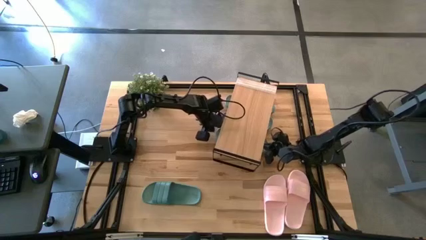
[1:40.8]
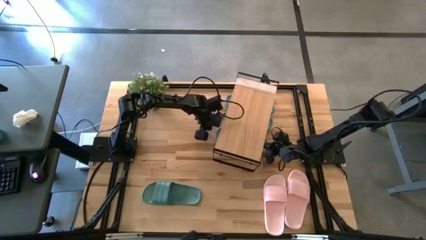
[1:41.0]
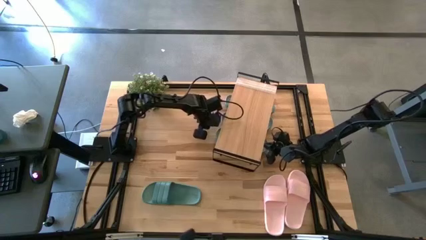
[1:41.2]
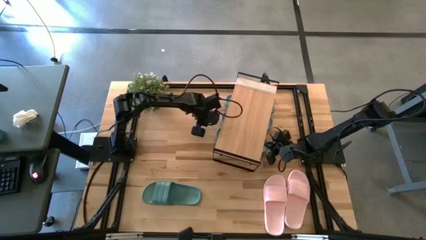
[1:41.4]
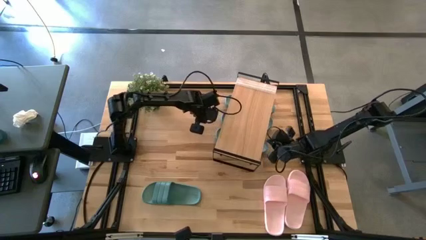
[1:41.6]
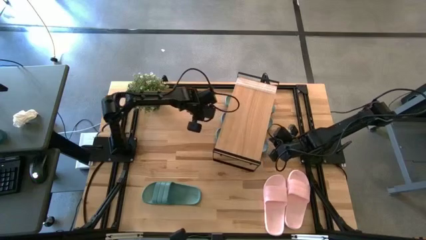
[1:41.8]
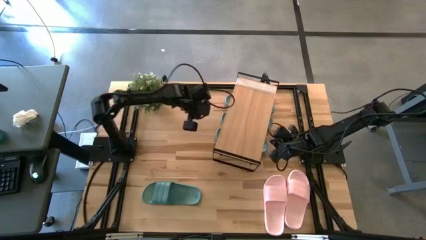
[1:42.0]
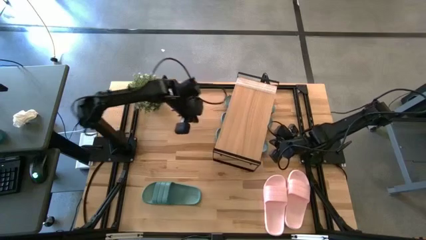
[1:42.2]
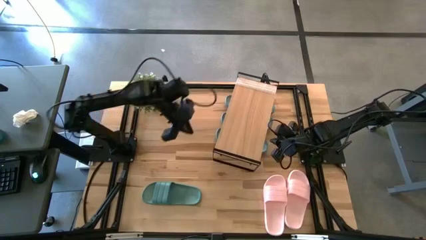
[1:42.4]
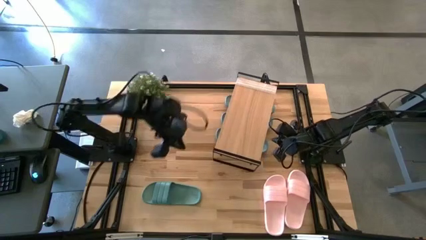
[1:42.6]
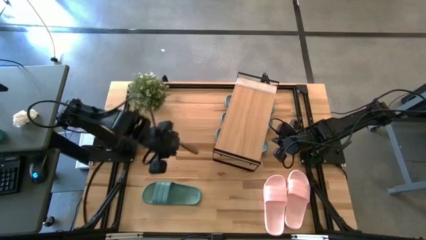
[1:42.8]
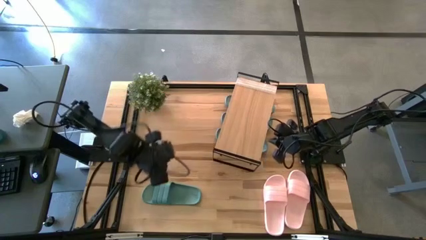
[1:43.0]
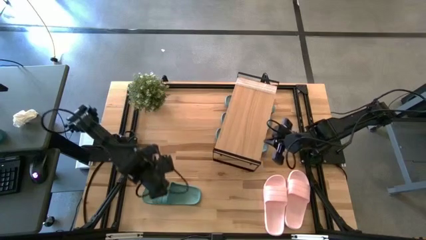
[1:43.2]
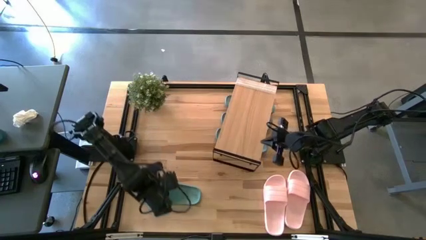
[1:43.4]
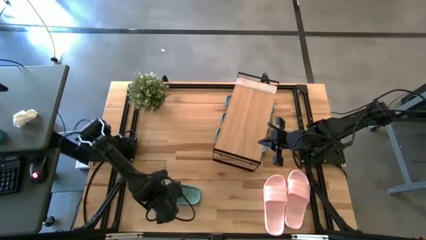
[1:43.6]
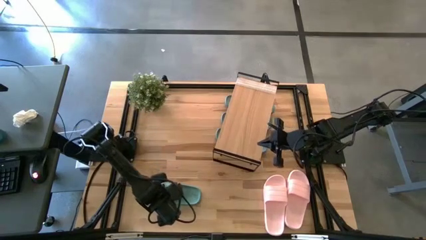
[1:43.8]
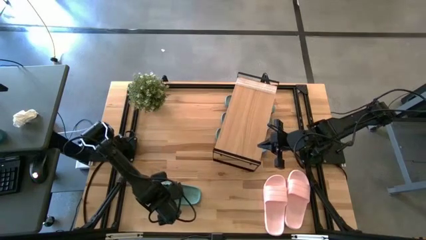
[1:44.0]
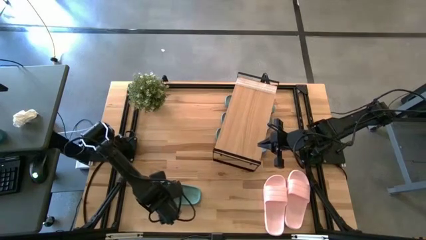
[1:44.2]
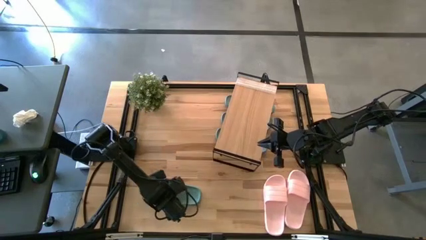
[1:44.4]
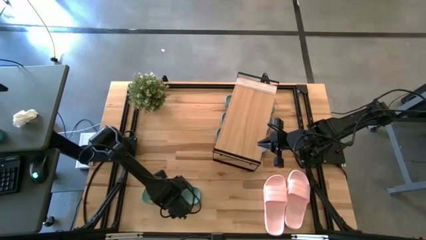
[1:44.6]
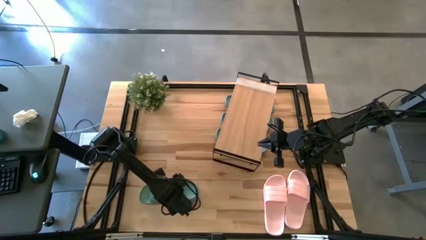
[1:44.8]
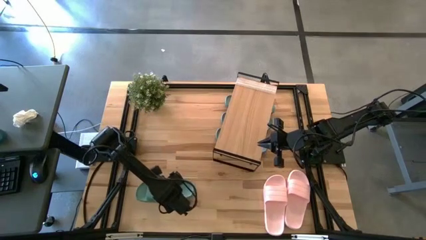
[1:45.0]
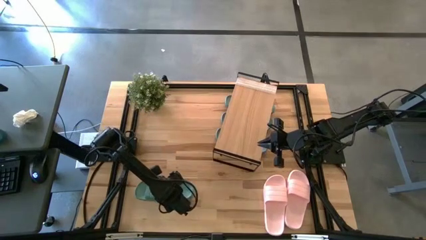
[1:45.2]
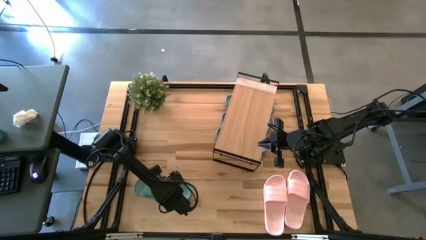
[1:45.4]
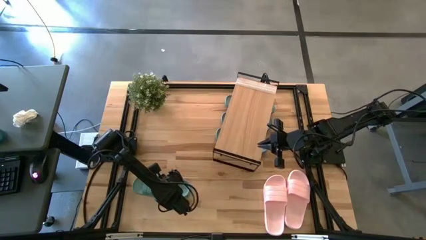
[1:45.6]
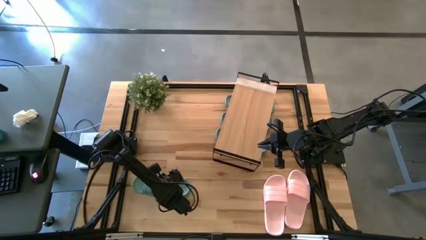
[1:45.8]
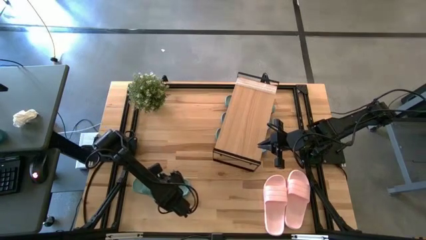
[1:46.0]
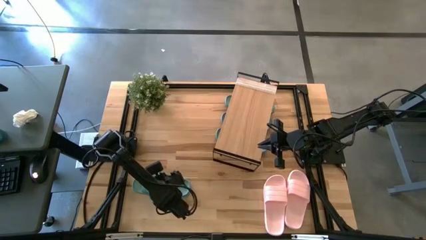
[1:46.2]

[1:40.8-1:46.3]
Task: Pick and place slides into the shelf
Put the green slide under the shelf

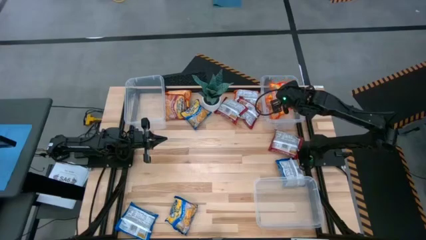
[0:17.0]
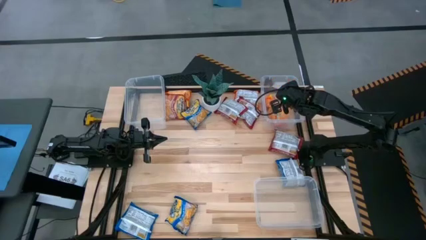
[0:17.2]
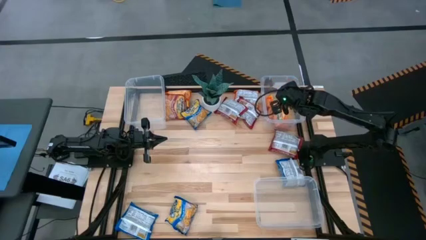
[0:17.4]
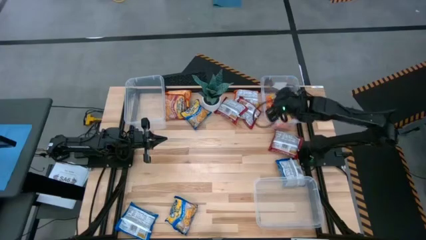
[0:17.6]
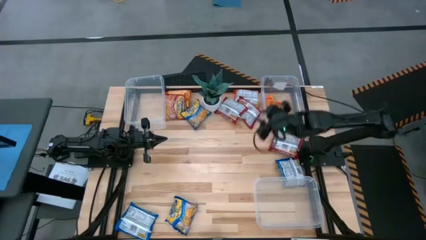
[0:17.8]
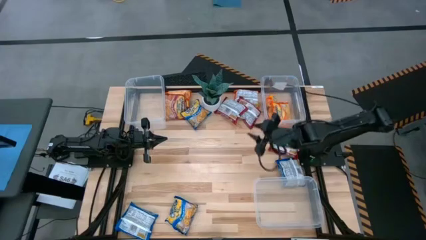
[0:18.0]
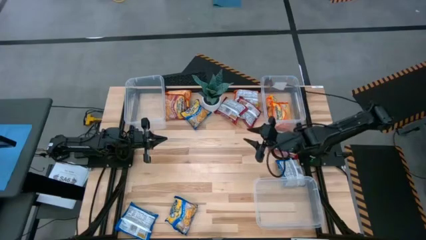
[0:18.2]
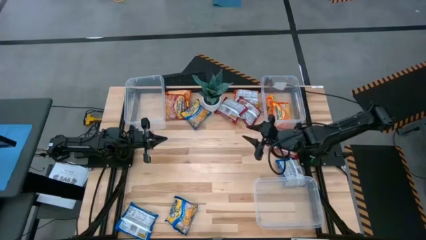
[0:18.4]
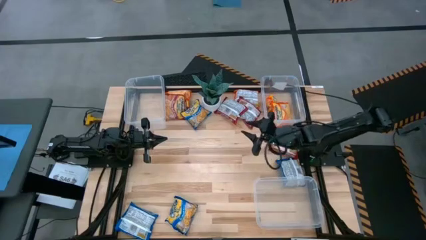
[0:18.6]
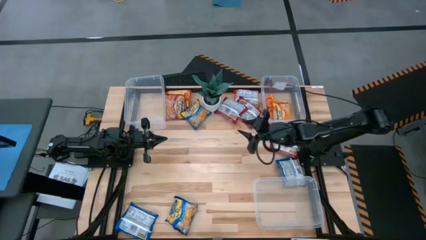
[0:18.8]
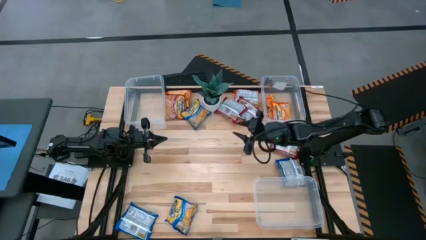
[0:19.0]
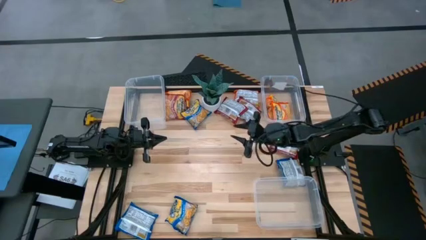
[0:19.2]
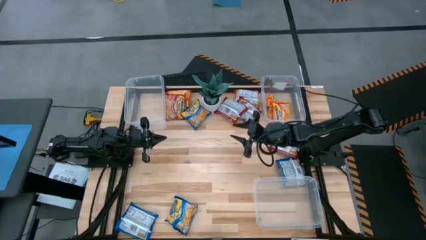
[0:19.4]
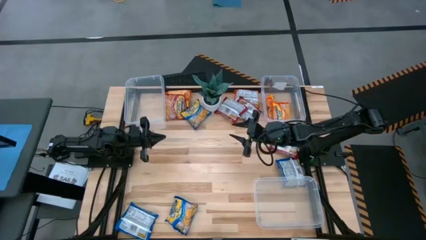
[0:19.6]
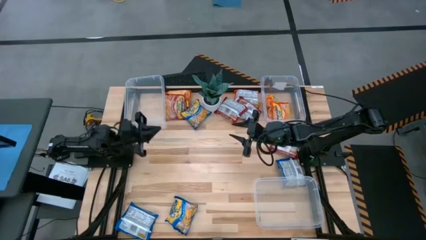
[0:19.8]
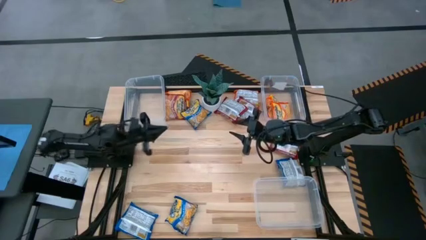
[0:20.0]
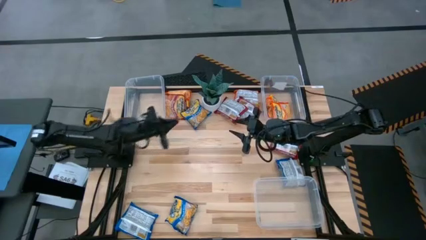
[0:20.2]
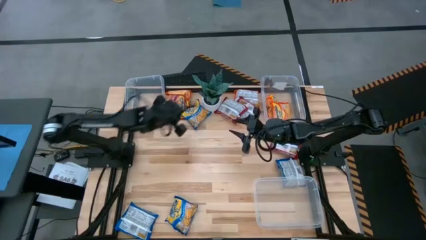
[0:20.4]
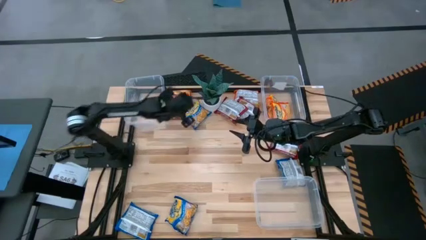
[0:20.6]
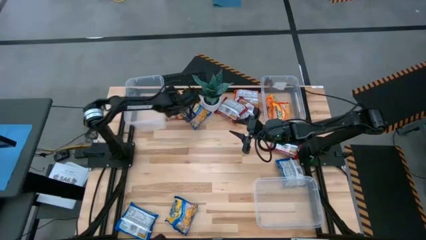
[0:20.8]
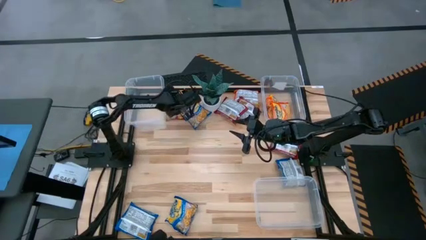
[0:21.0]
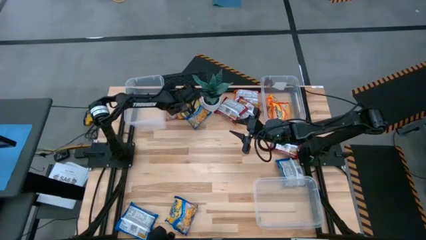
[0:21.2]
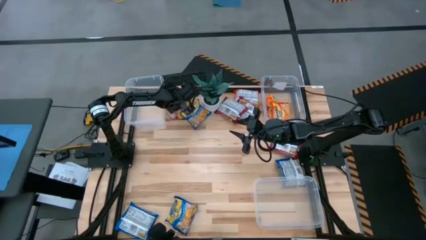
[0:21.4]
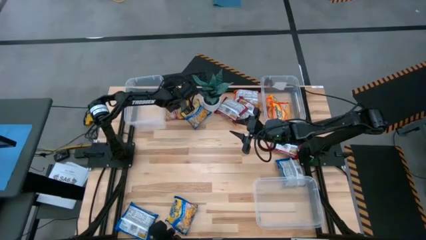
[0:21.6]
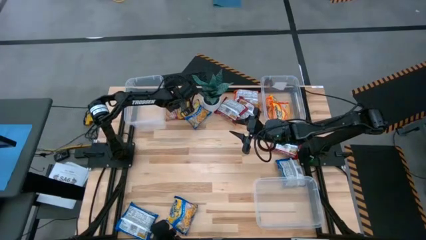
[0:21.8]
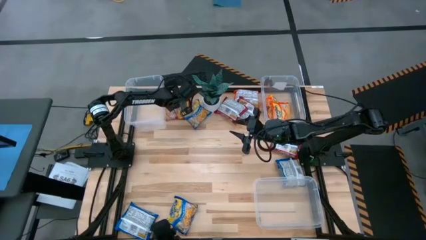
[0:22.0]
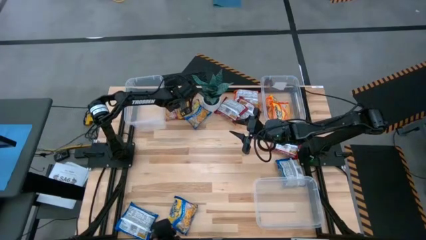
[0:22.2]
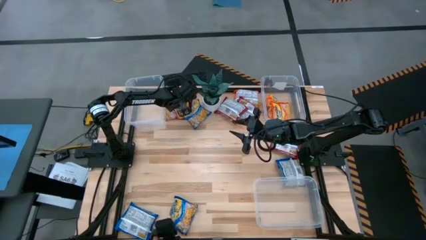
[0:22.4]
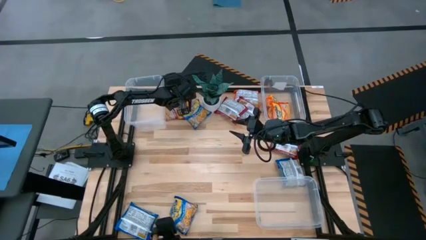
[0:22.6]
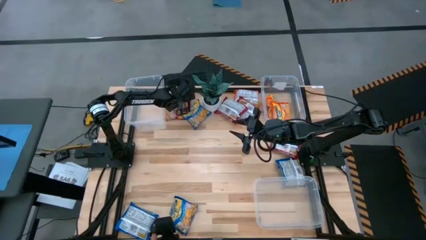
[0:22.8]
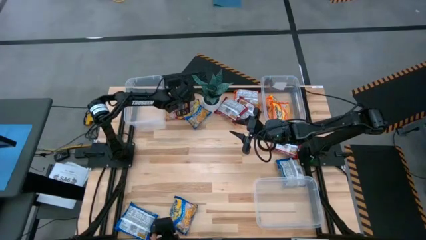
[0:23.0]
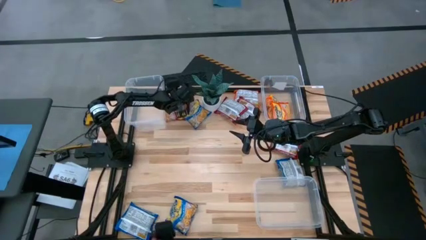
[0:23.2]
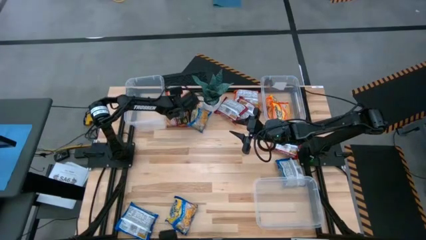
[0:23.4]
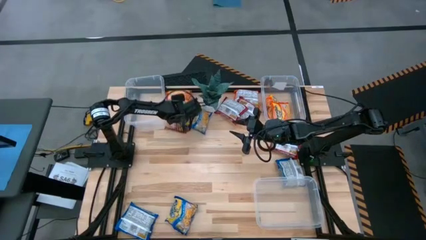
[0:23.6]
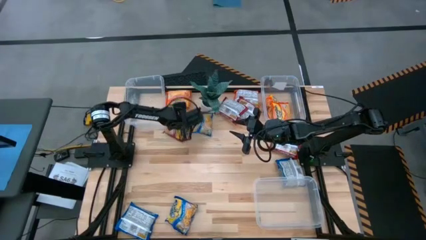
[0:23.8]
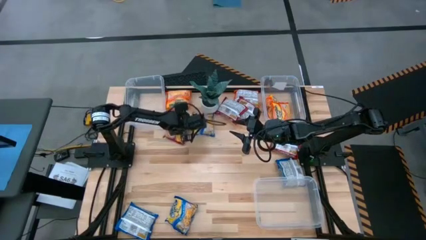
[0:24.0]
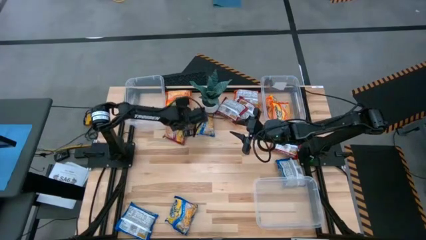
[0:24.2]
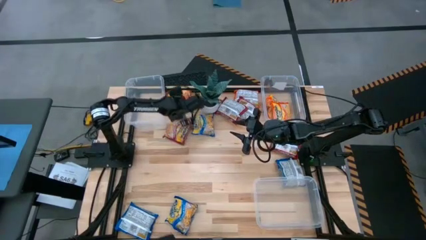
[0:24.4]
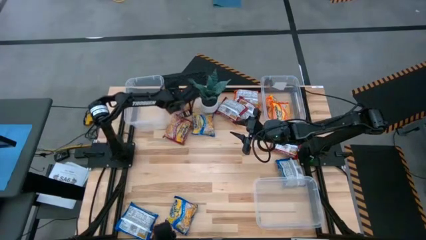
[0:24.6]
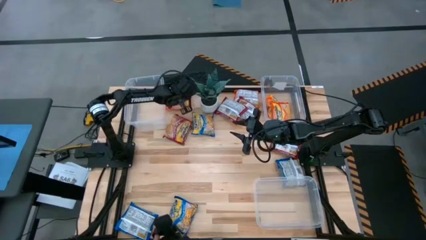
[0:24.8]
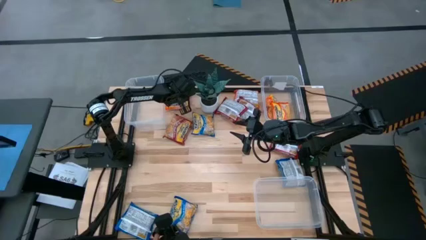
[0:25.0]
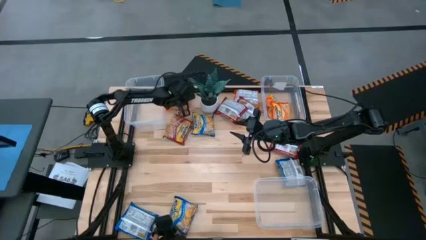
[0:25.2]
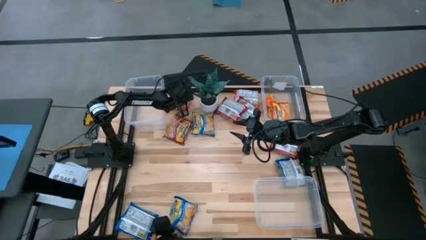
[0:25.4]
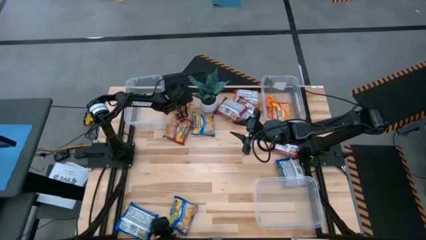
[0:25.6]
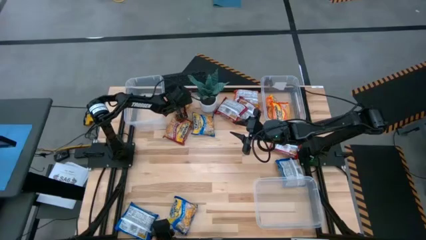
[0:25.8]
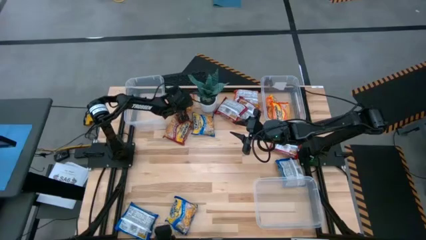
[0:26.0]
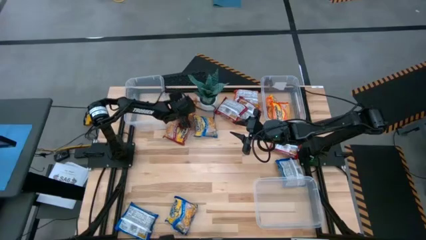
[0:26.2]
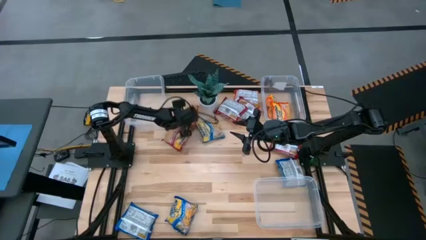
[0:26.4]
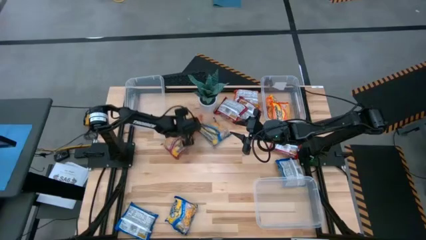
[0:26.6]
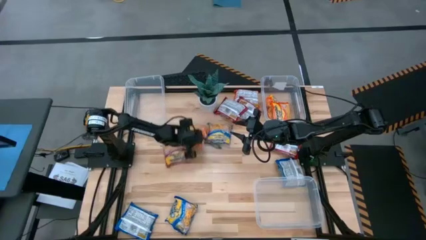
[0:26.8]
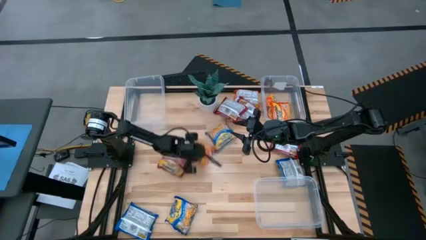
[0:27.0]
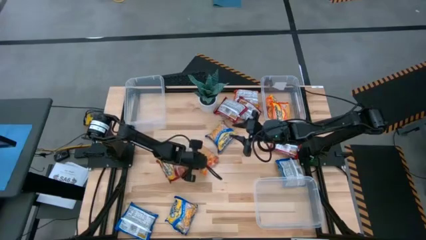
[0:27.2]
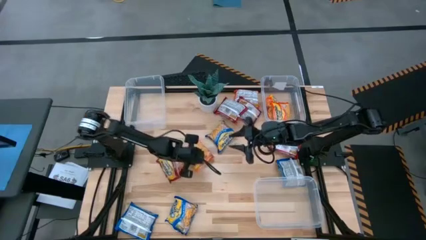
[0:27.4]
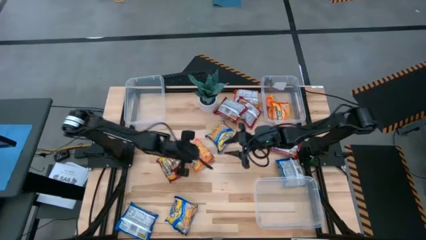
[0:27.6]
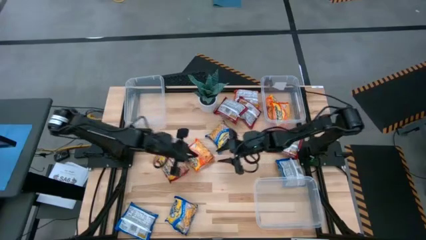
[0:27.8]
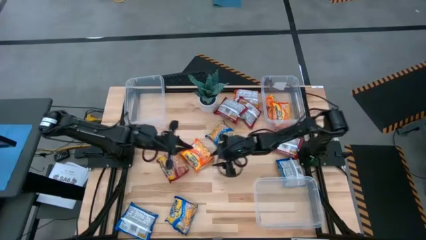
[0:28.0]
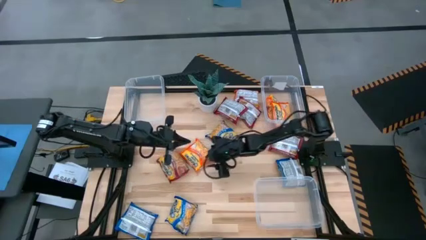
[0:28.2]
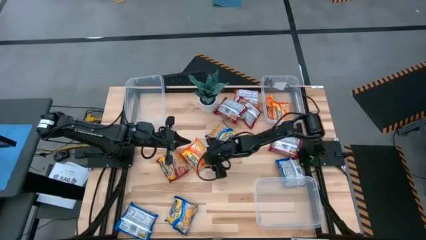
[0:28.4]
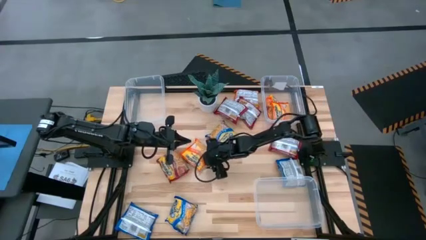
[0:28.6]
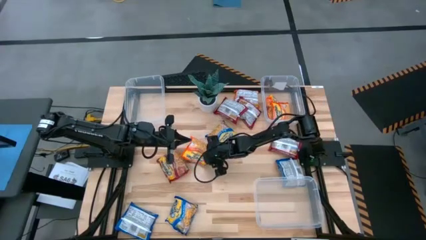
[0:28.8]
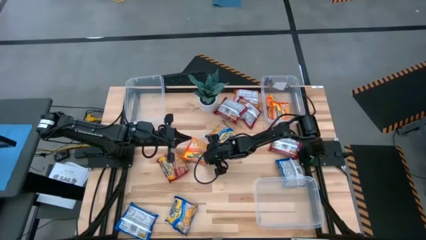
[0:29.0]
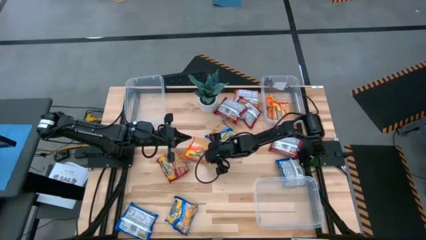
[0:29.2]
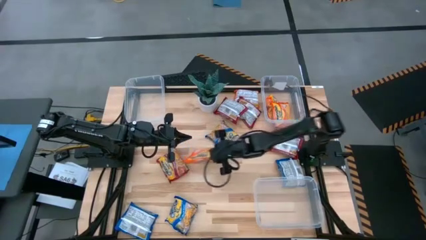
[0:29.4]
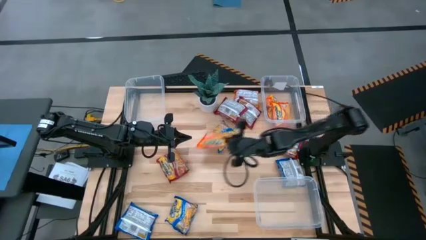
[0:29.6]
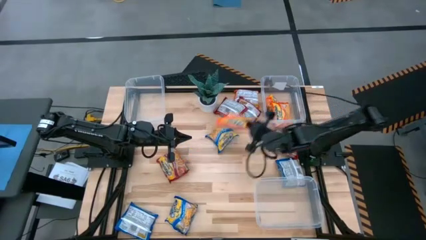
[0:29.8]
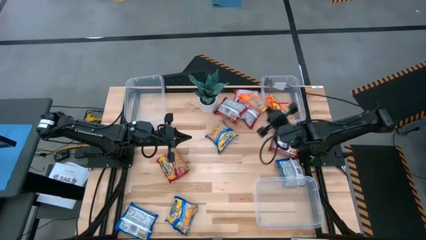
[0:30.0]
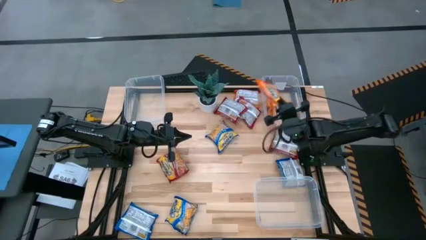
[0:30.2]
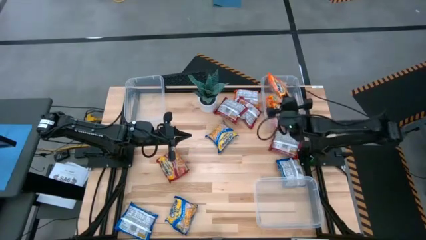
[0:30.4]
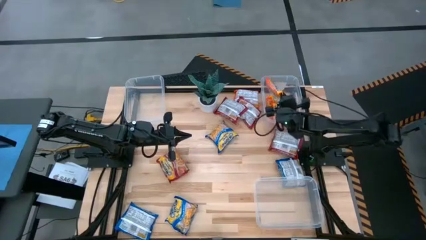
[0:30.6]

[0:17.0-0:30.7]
Task: Sort Maruchan noodles
Put the orange noodle pack in the top right transparent bin
